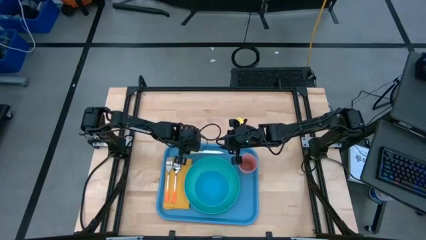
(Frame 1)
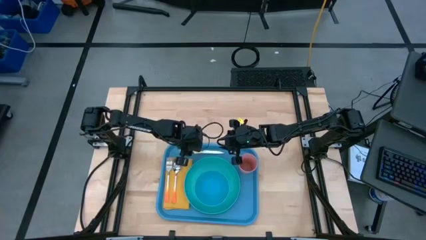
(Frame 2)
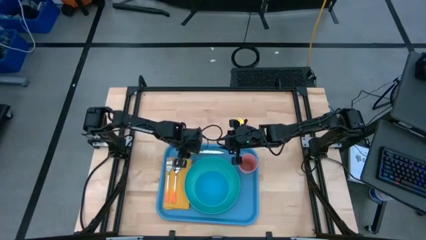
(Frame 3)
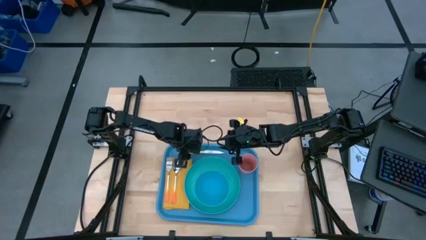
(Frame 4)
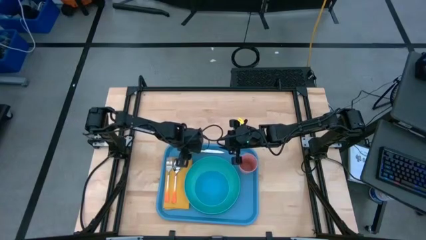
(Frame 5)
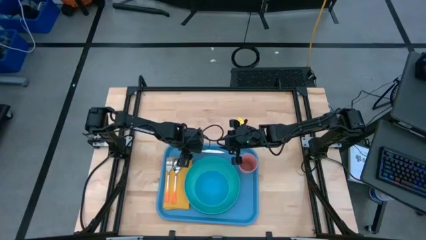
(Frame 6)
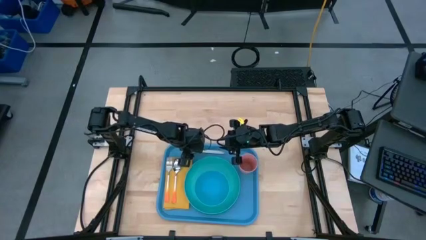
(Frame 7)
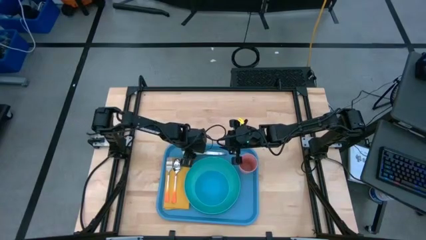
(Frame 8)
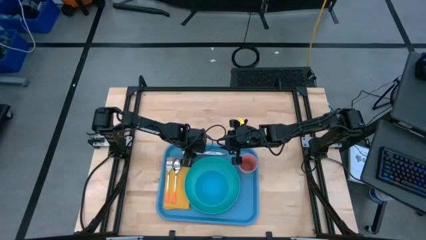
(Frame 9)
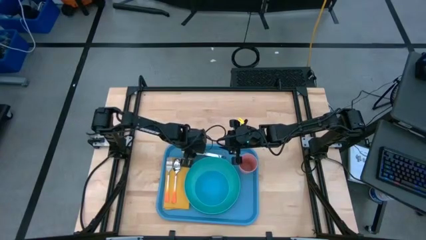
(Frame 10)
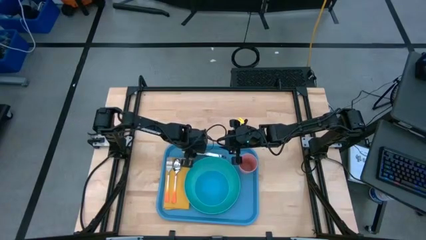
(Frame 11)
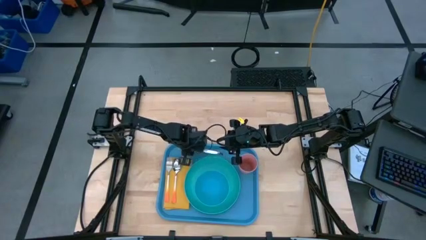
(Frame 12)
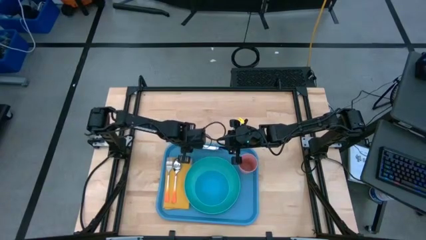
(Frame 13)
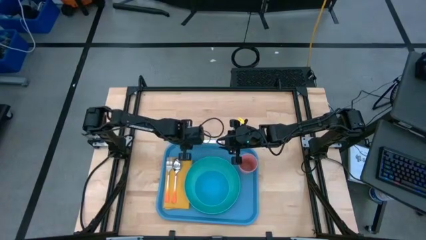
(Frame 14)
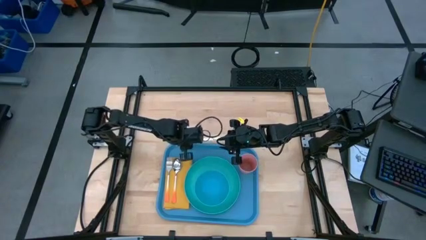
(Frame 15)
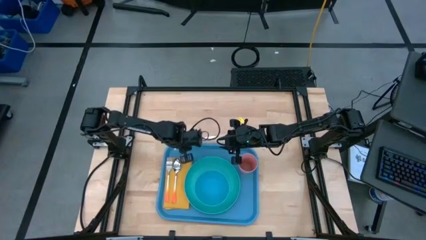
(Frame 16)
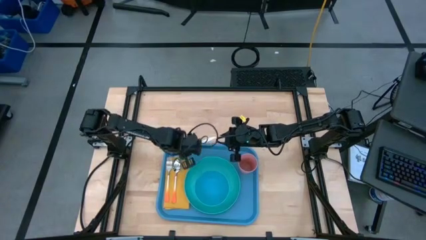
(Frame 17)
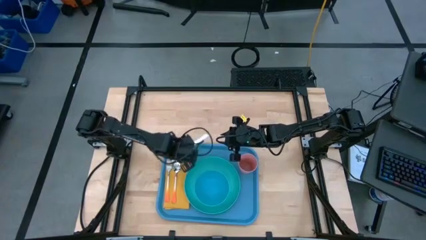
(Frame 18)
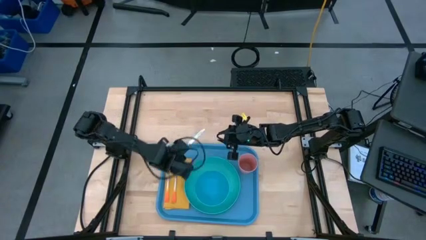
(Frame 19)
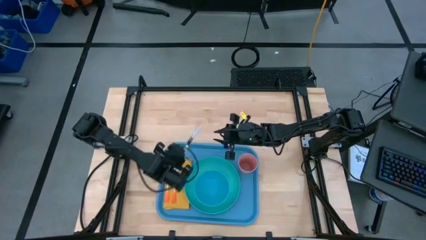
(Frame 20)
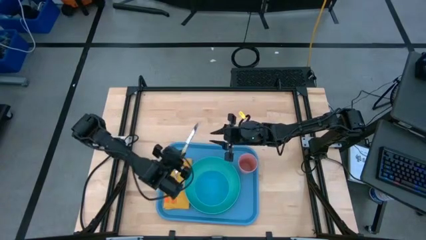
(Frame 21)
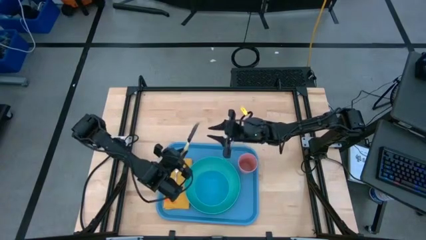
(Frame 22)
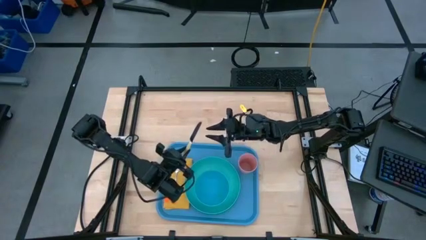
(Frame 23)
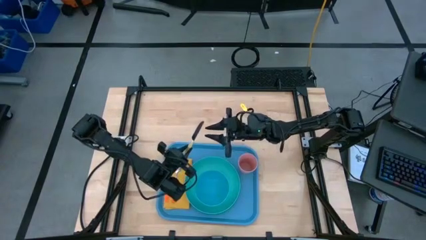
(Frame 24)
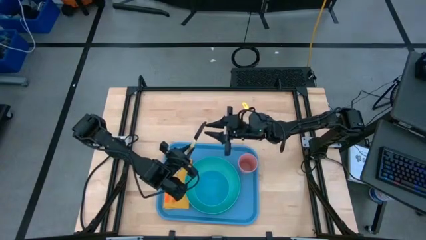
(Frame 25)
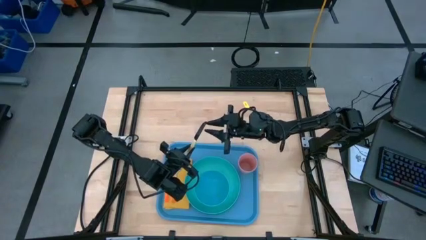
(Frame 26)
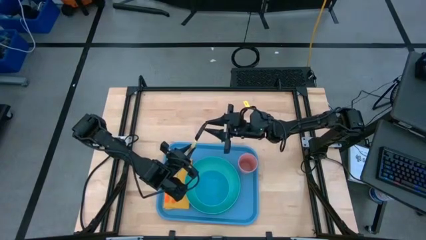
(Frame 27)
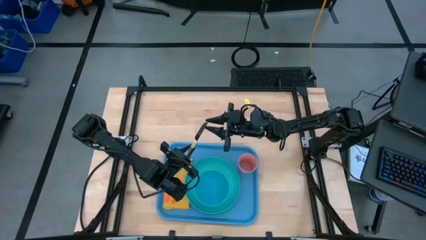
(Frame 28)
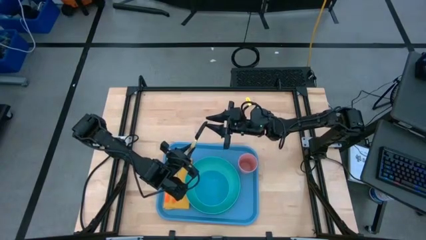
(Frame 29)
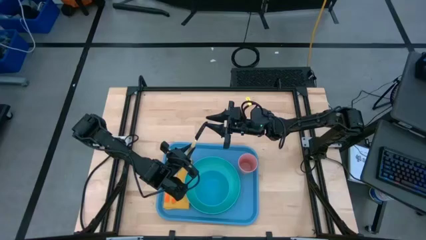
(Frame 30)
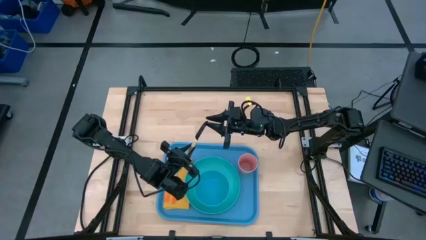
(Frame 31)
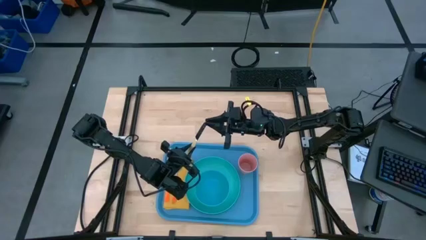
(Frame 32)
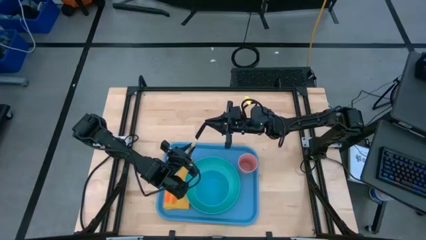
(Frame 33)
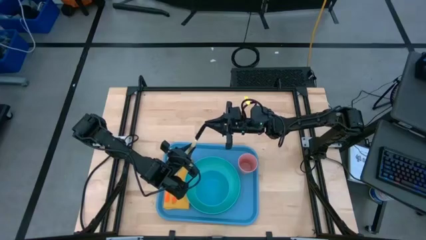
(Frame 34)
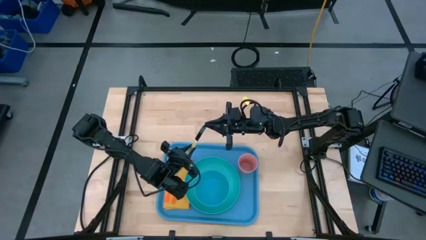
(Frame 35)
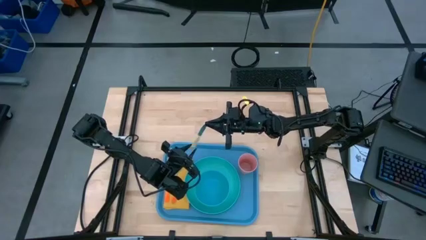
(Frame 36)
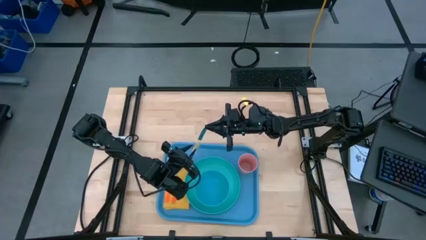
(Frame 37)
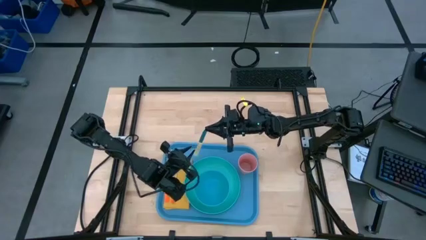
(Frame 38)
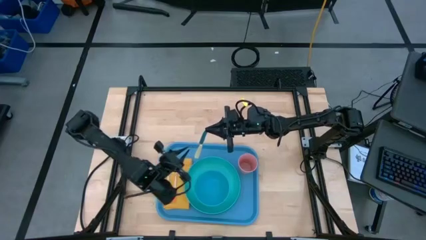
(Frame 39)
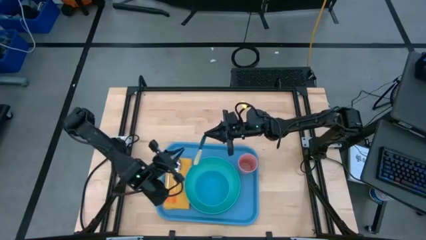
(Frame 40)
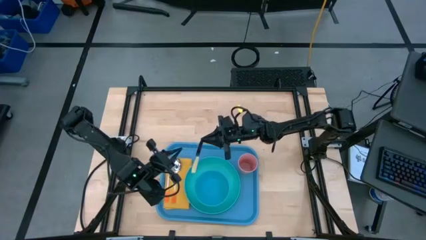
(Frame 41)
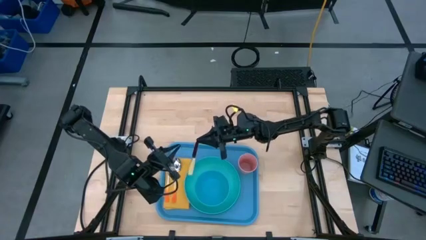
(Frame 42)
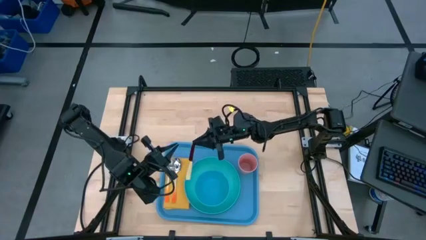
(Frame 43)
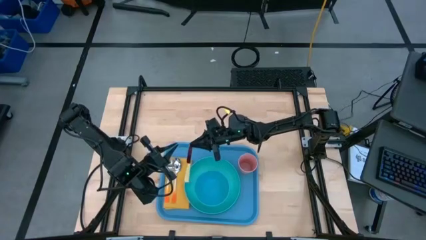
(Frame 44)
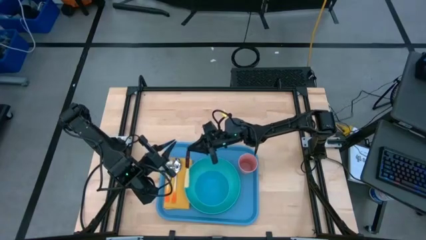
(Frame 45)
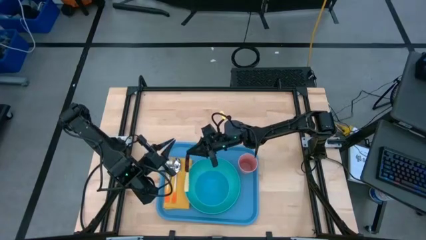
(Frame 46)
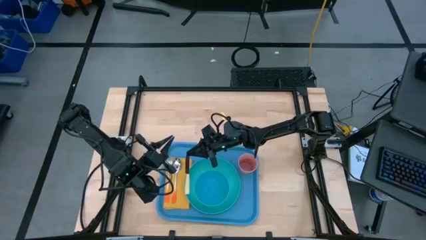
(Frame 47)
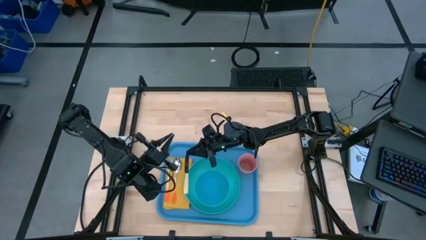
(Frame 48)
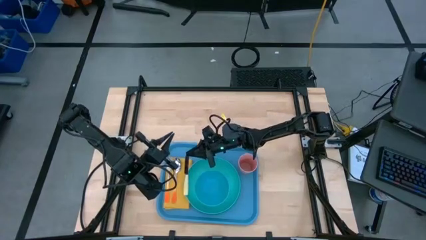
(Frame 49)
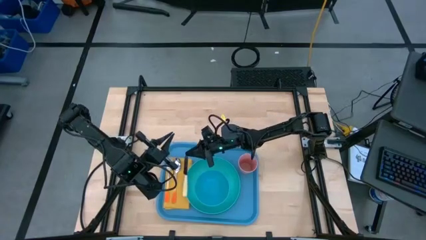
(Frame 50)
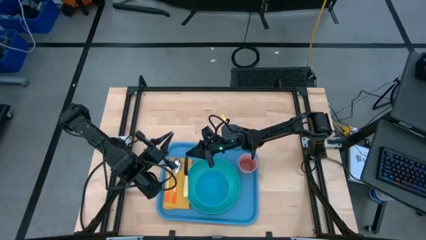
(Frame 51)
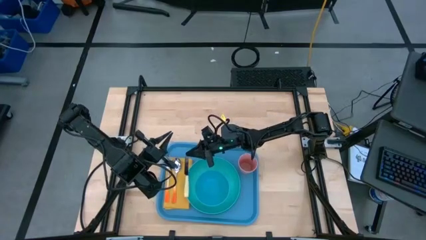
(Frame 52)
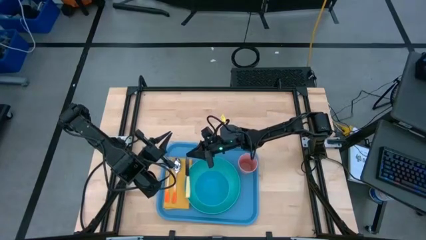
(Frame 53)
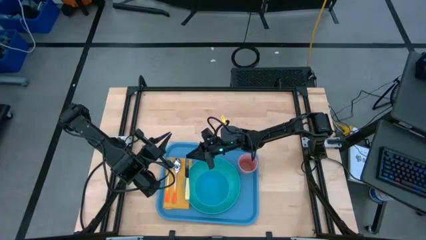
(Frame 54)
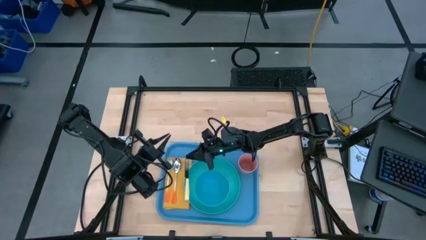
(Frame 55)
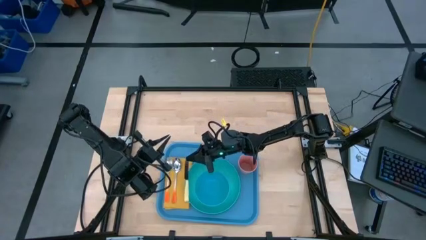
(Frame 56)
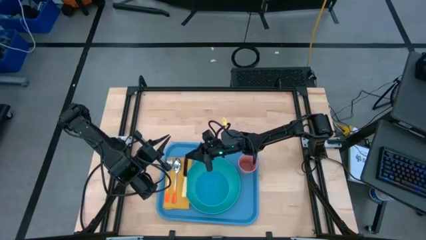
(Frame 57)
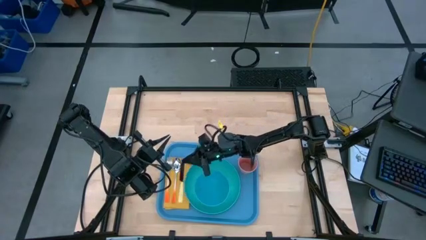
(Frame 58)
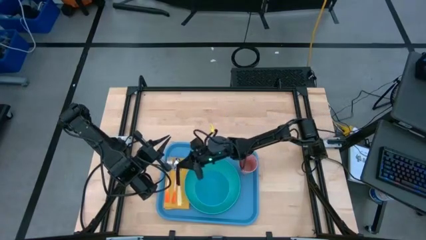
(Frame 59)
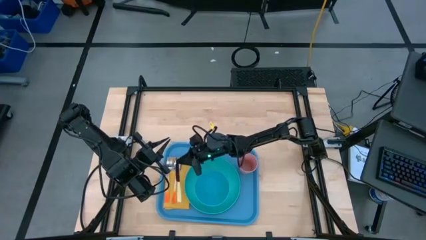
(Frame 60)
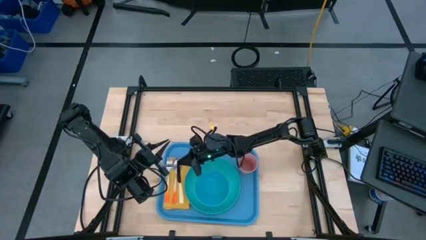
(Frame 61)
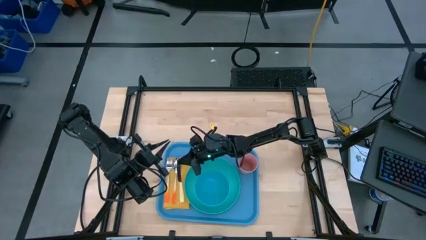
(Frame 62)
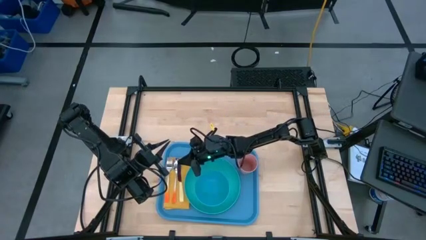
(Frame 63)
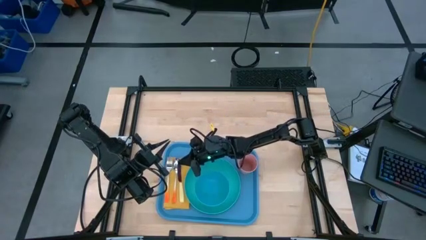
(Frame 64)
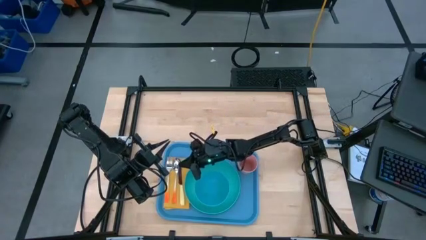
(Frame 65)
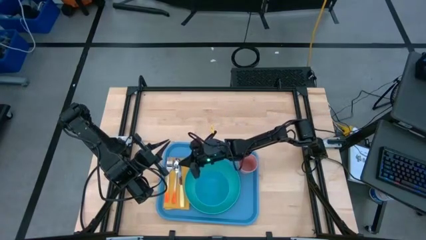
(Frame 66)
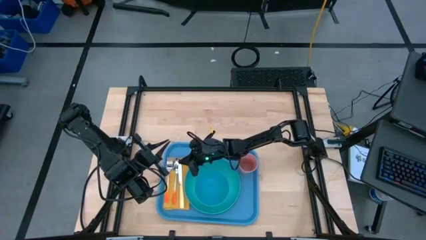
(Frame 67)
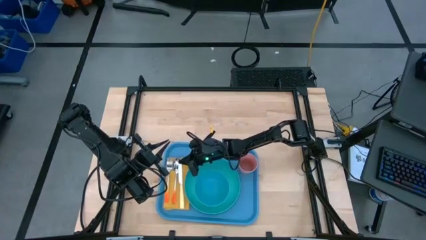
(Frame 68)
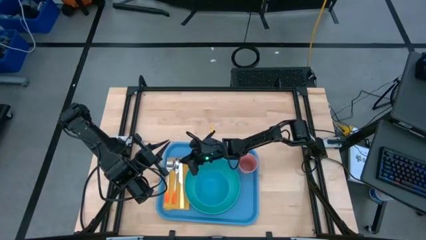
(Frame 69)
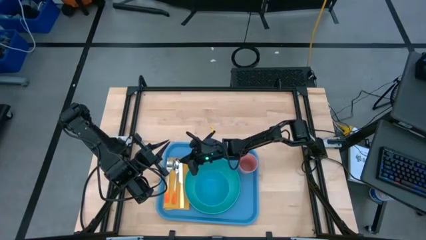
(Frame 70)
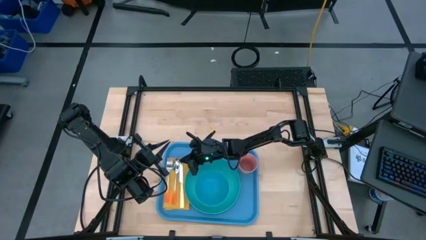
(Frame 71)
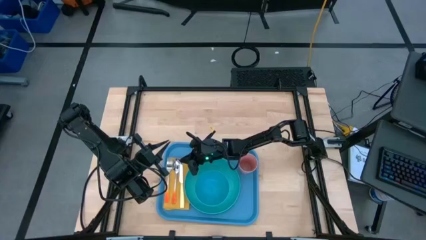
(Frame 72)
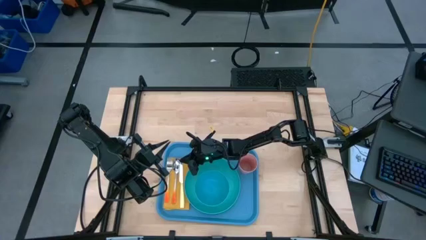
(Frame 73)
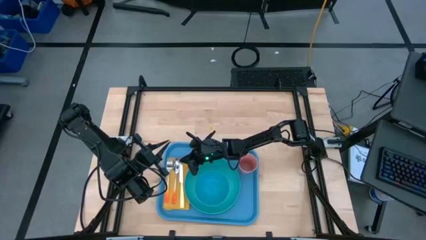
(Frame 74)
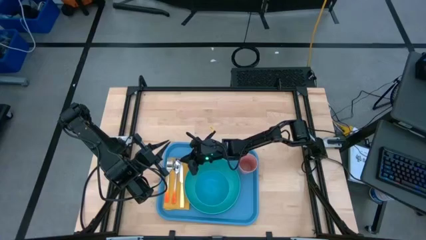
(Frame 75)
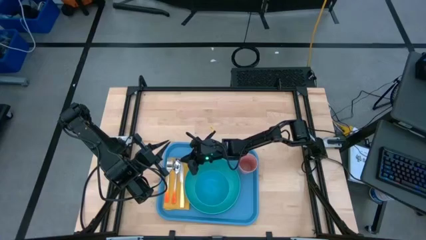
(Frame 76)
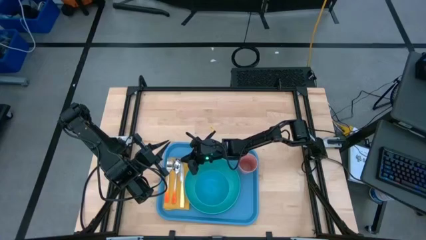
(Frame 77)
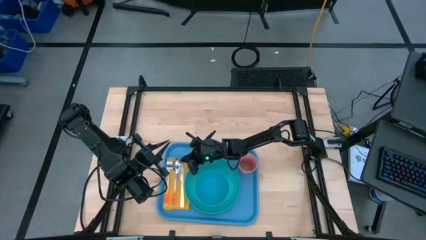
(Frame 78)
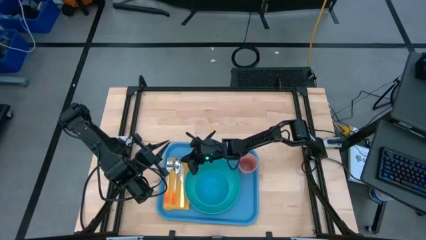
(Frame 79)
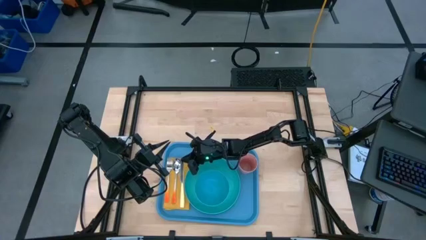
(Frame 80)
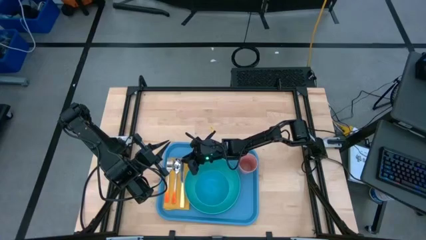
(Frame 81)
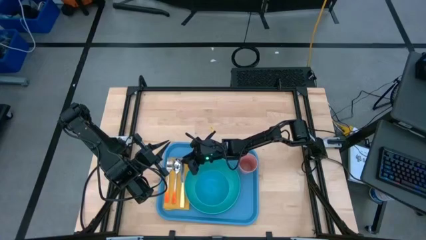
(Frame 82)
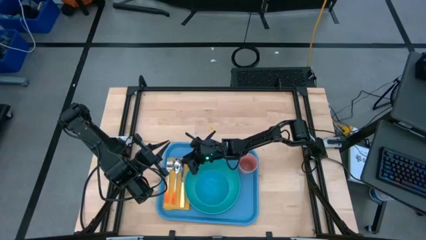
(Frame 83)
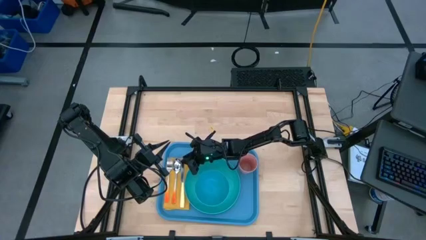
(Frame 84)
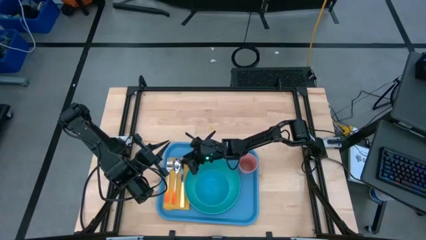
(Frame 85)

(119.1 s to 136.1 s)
Task: Set up tray
Put the yellow knife on the yellow napkin to the right of the orange spoon
